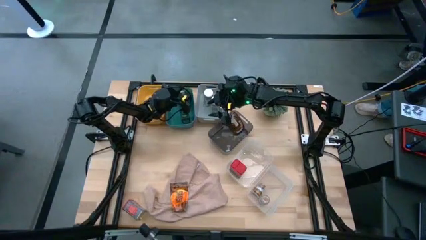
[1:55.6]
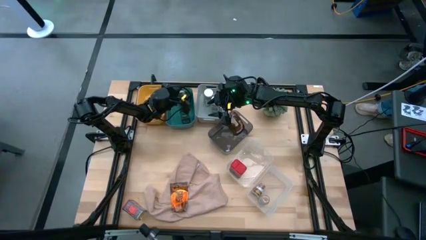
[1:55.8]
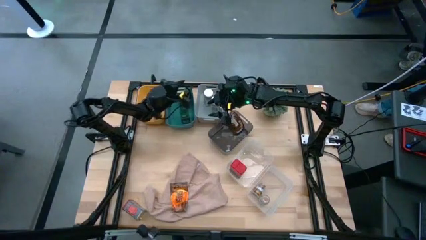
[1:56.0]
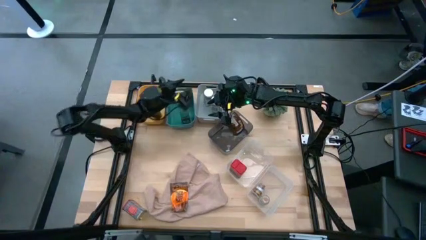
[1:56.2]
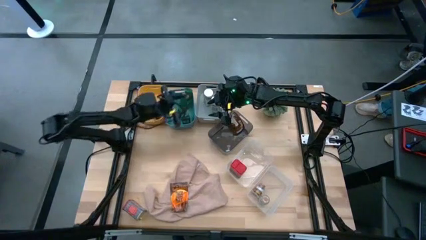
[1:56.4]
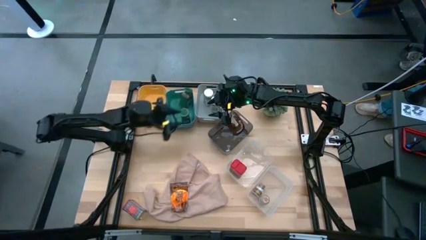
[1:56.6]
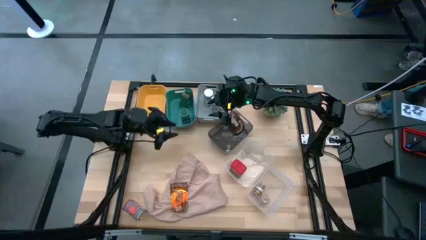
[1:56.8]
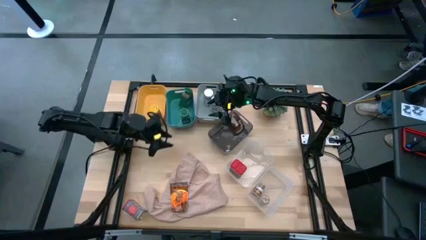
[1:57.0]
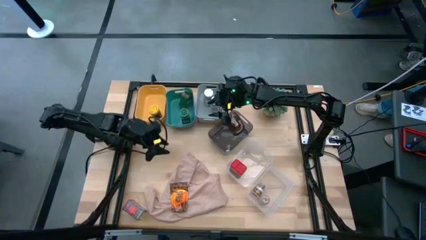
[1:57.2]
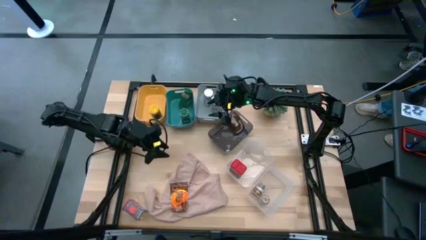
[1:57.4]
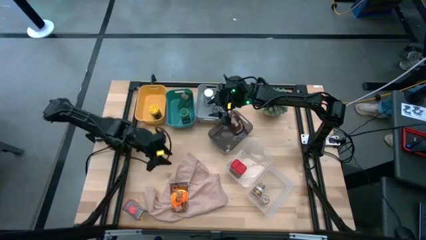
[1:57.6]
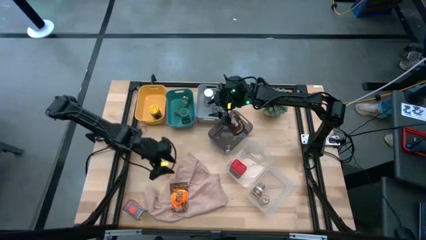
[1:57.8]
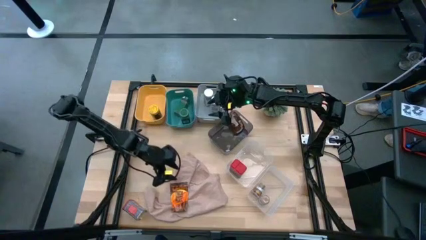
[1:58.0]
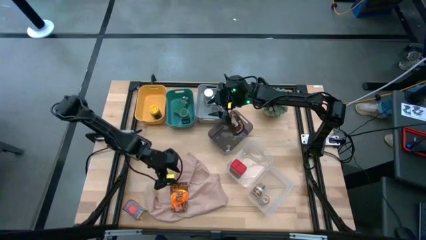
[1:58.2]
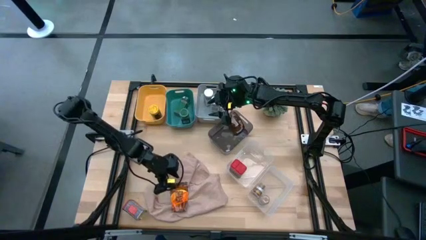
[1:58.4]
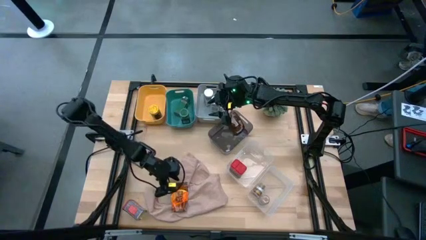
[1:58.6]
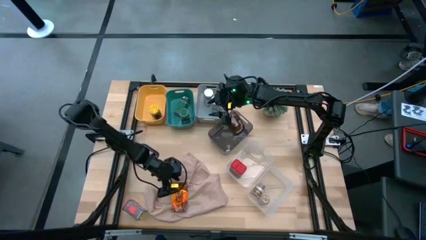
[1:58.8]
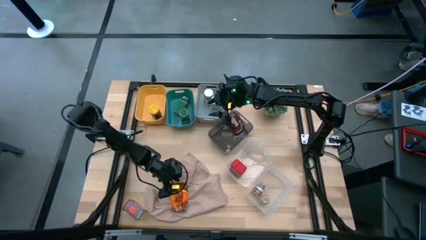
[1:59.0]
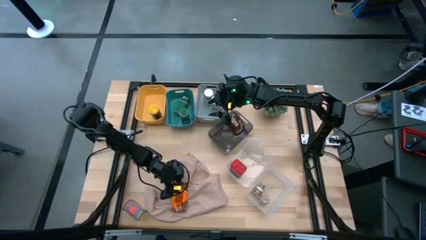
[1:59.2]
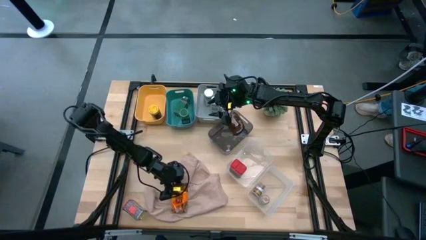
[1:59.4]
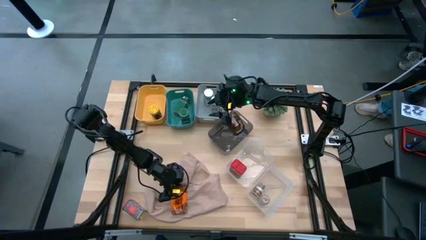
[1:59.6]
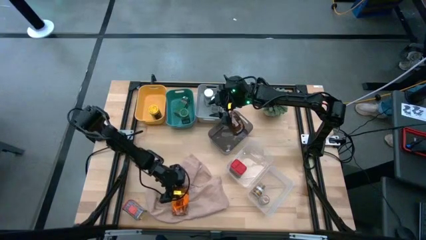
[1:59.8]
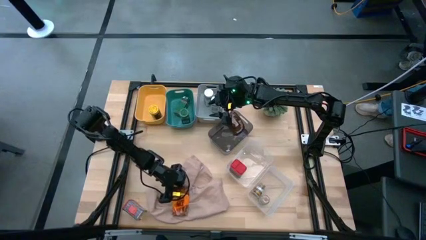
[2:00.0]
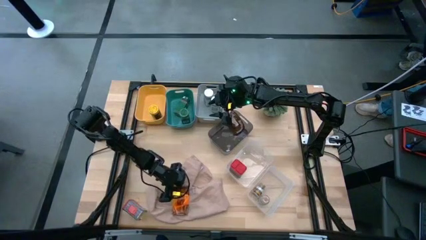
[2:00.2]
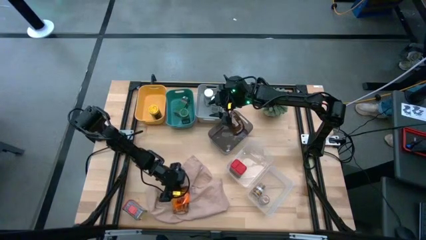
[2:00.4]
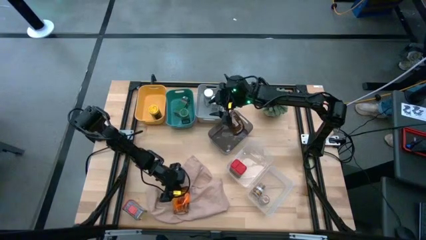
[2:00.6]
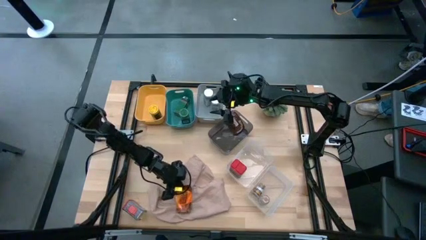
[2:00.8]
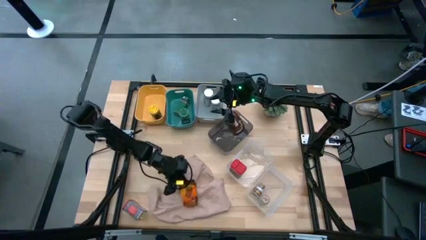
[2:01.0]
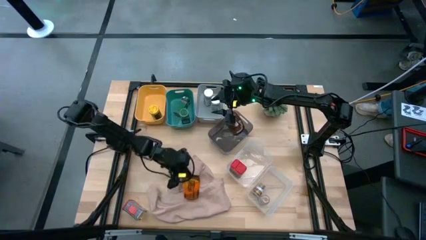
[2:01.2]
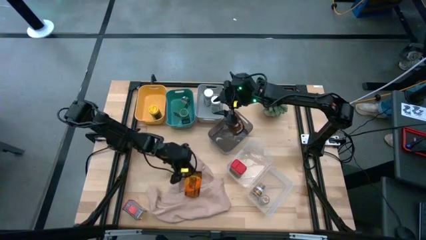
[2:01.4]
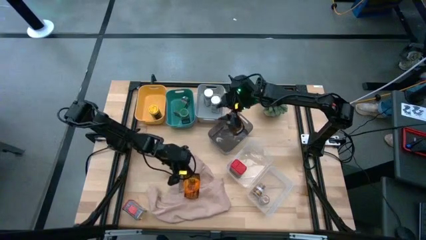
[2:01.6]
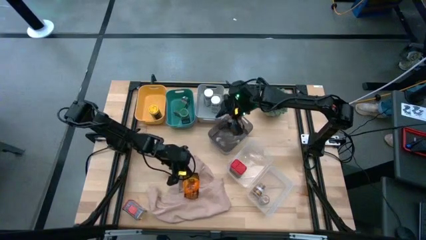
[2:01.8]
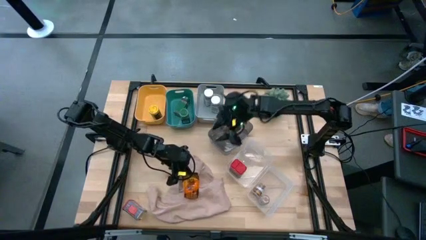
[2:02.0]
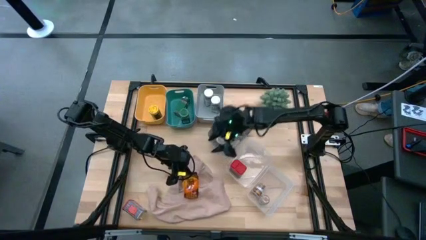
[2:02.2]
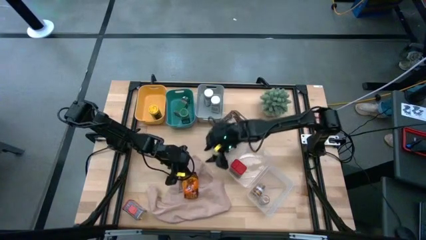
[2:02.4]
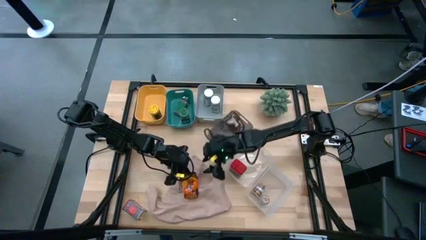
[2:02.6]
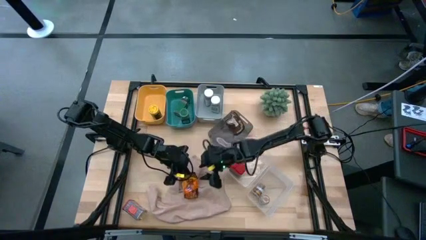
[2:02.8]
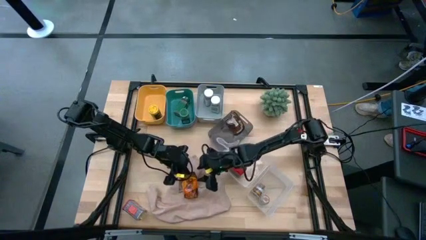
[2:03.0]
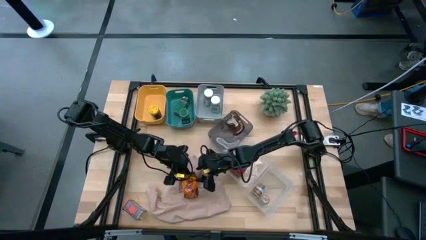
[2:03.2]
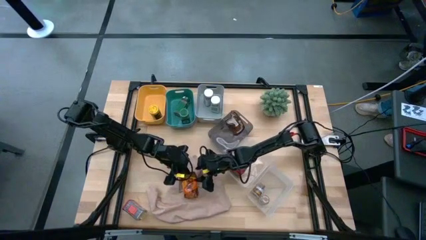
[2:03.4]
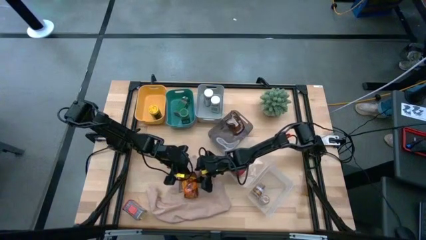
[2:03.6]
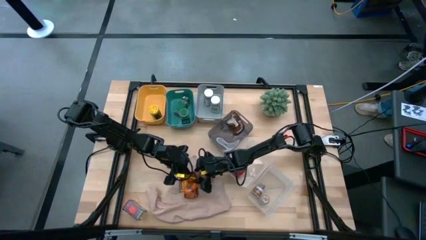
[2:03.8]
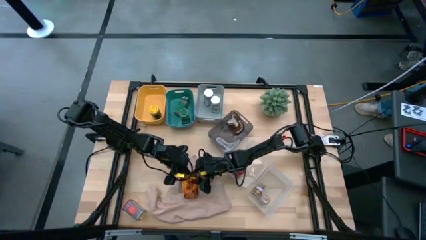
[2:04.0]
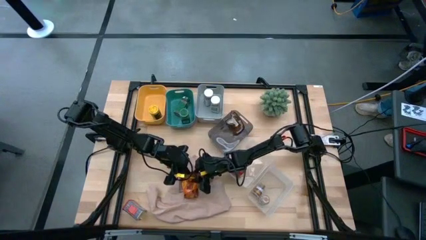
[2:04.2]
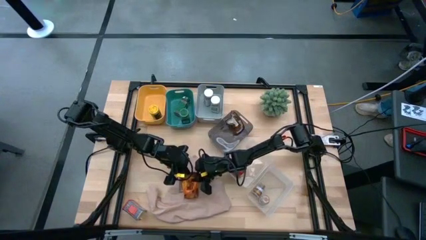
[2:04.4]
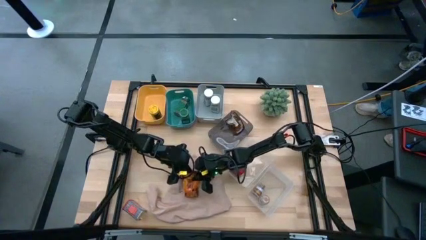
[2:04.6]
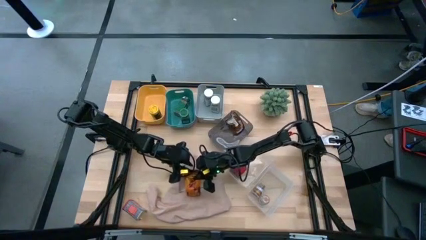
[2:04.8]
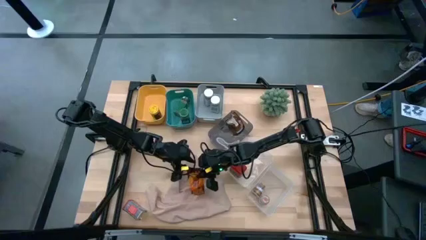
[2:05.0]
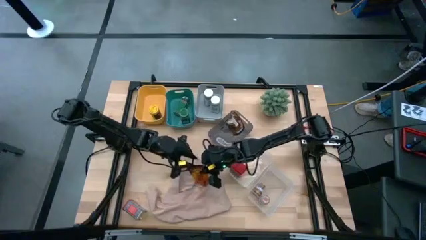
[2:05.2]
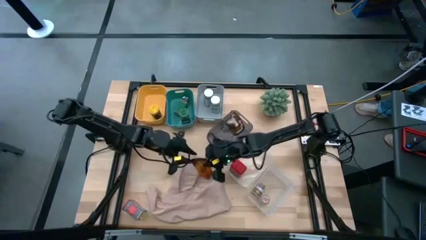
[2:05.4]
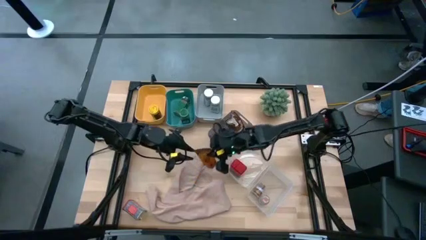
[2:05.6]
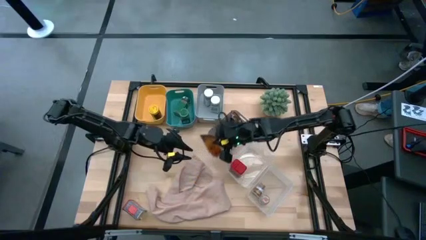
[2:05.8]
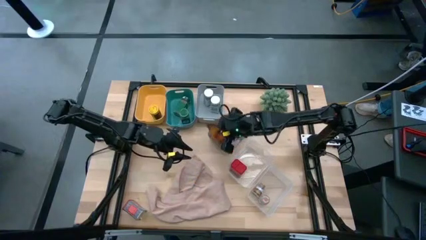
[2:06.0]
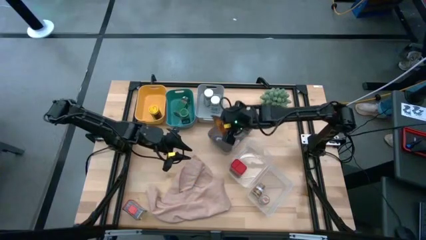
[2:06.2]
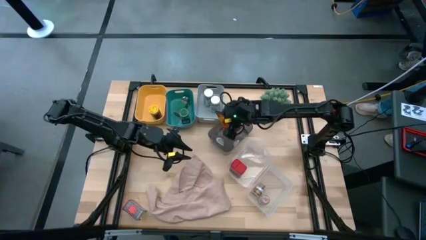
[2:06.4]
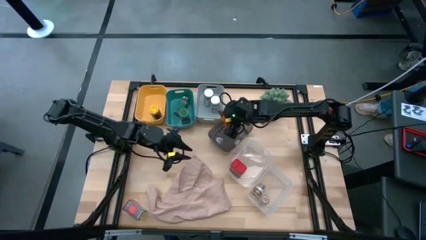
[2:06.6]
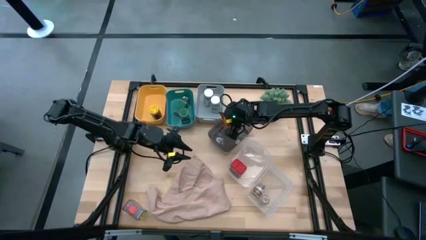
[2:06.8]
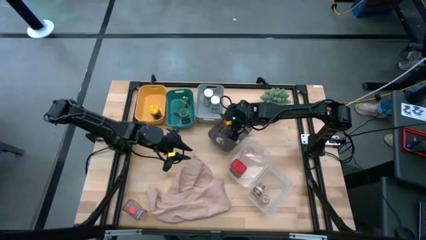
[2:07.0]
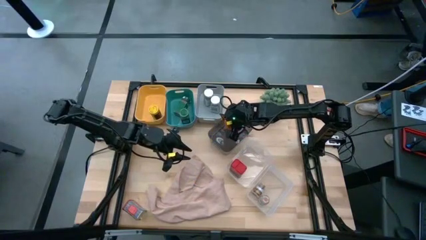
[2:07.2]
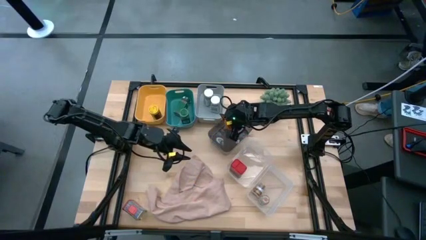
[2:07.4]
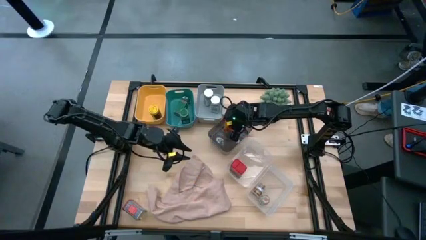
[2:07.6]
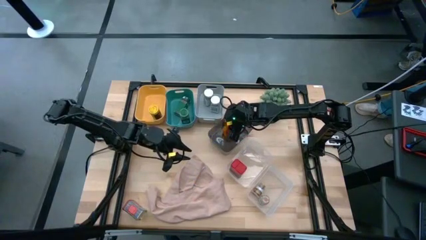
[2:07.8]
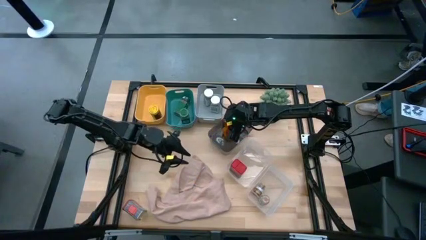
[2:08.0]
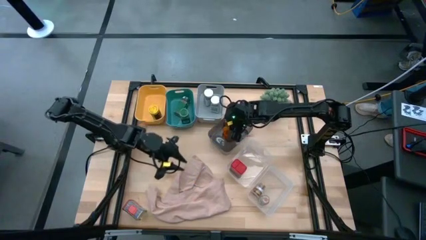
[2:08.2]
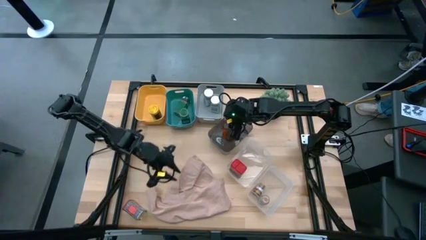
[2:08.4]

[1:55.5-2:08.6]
Task: Sort spices by type
Put the orange seasoning pack into the black bin
